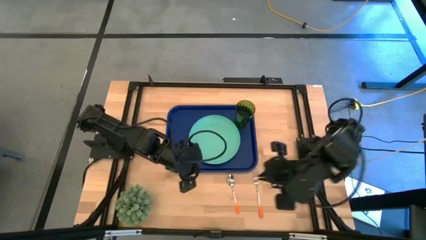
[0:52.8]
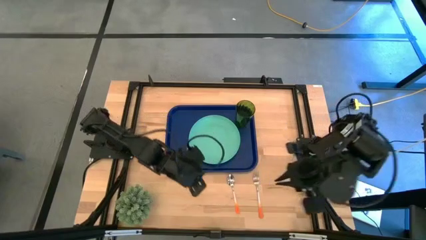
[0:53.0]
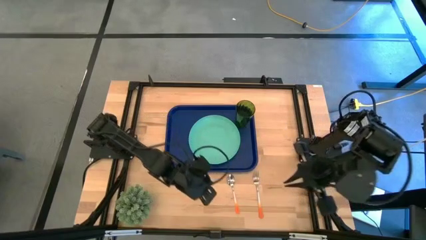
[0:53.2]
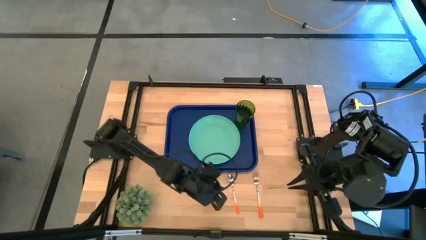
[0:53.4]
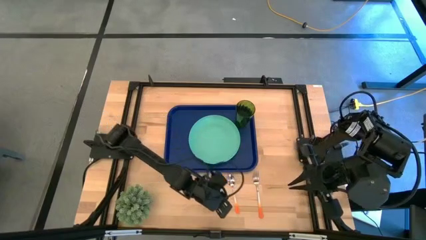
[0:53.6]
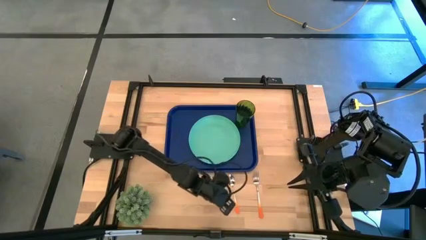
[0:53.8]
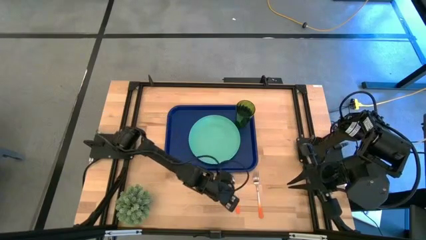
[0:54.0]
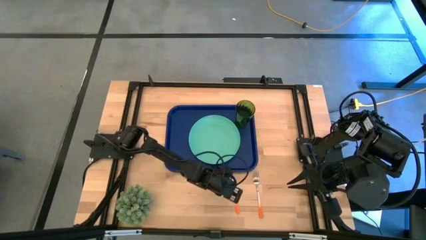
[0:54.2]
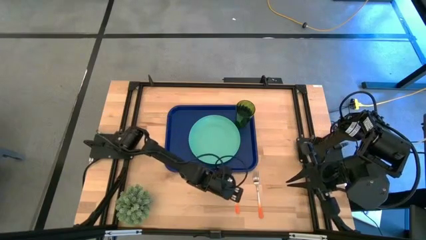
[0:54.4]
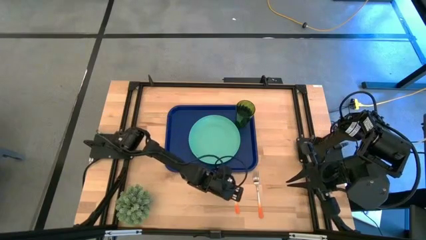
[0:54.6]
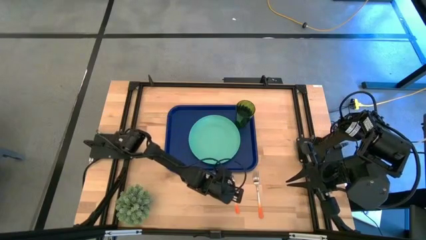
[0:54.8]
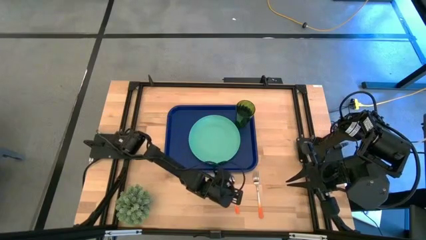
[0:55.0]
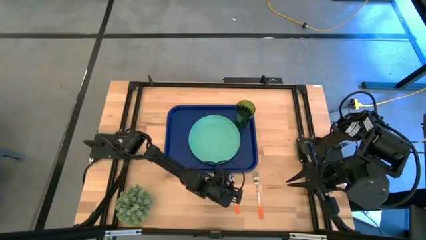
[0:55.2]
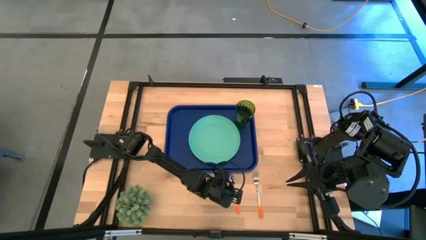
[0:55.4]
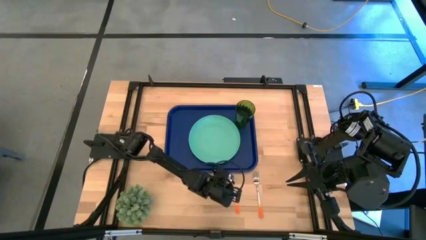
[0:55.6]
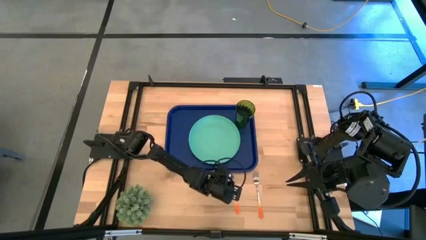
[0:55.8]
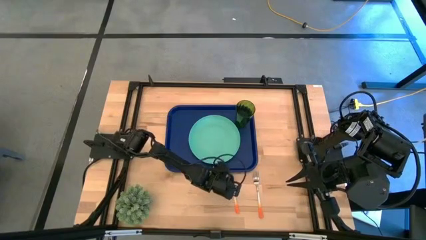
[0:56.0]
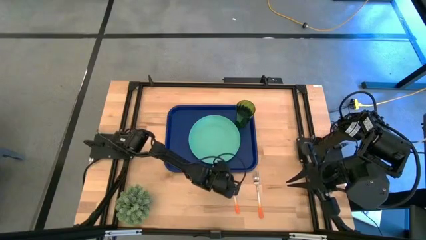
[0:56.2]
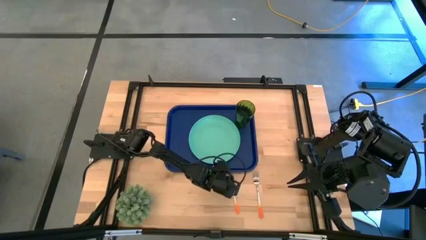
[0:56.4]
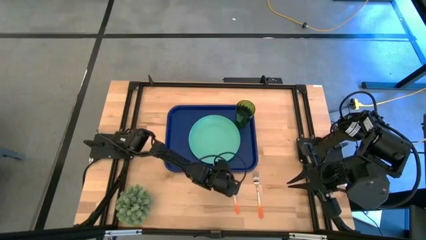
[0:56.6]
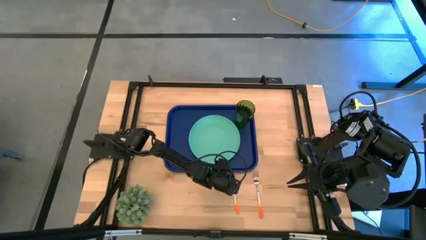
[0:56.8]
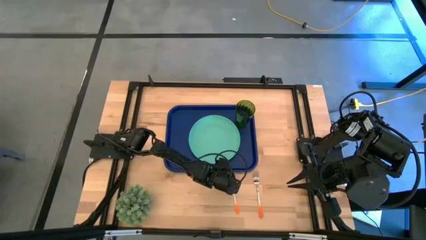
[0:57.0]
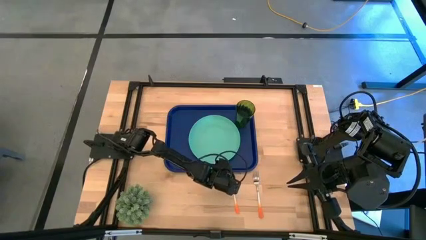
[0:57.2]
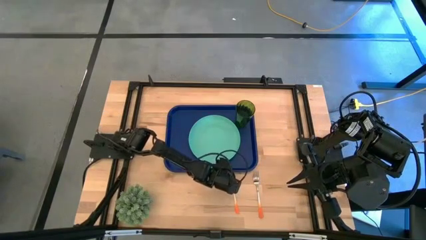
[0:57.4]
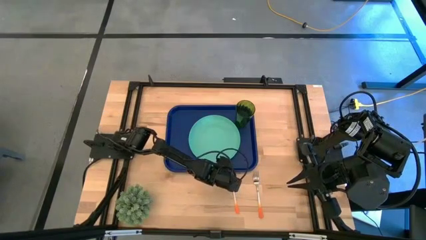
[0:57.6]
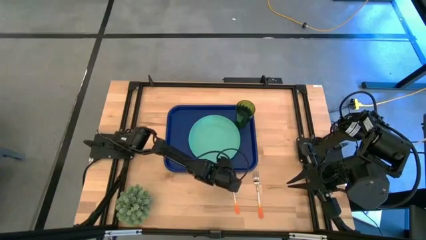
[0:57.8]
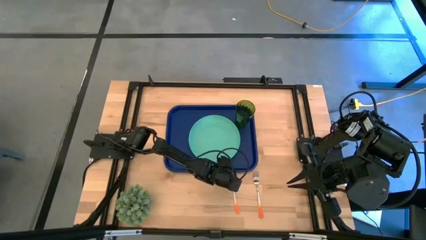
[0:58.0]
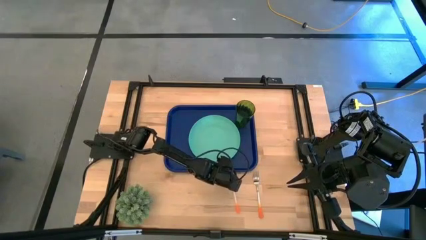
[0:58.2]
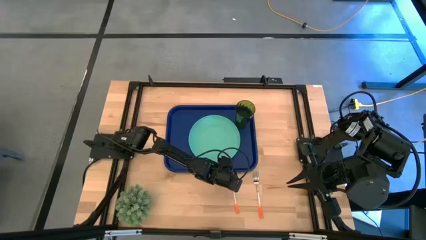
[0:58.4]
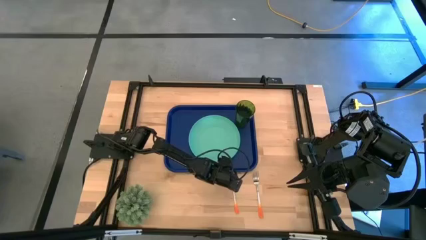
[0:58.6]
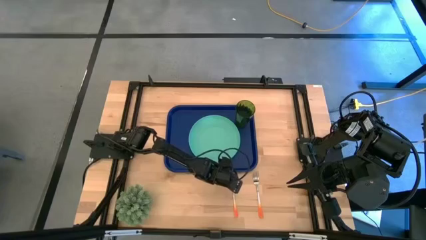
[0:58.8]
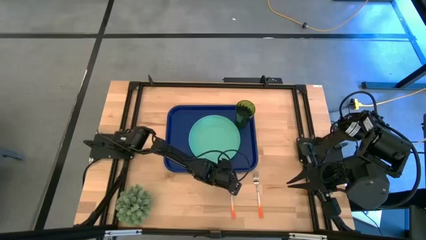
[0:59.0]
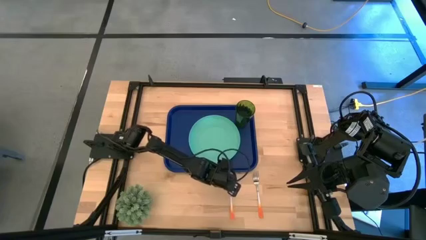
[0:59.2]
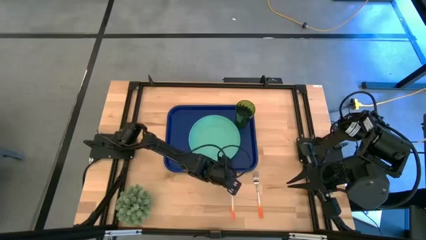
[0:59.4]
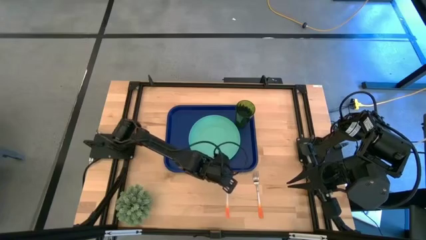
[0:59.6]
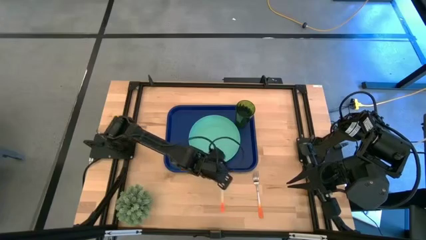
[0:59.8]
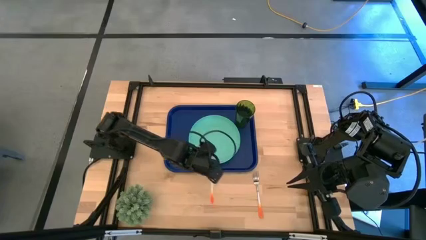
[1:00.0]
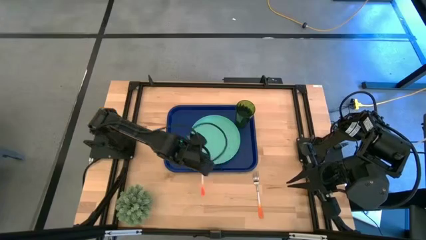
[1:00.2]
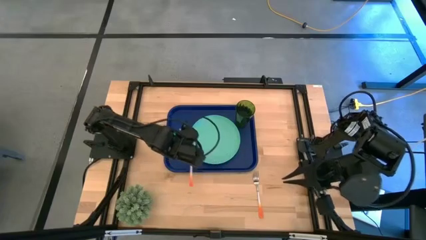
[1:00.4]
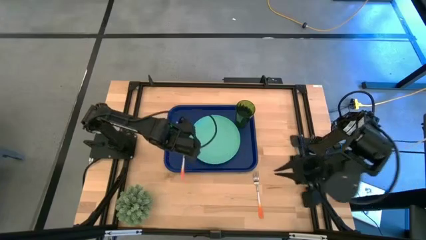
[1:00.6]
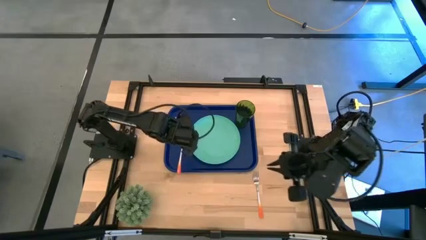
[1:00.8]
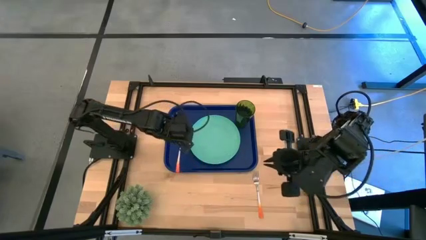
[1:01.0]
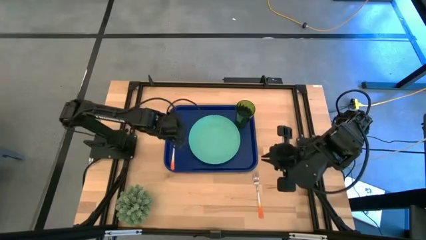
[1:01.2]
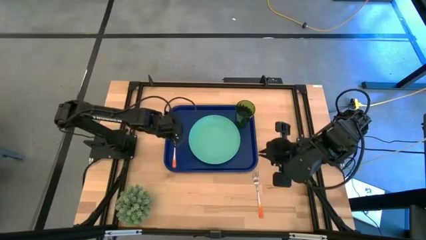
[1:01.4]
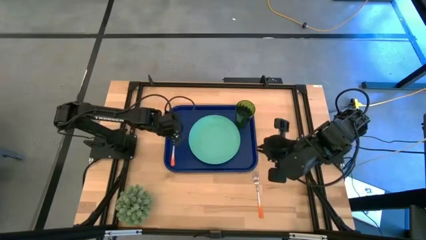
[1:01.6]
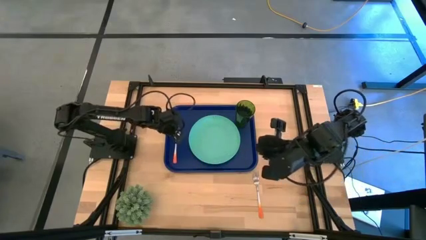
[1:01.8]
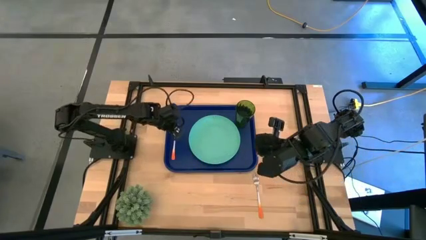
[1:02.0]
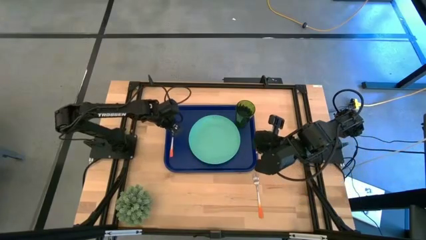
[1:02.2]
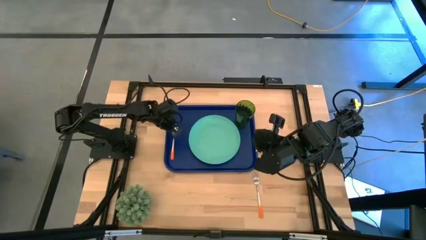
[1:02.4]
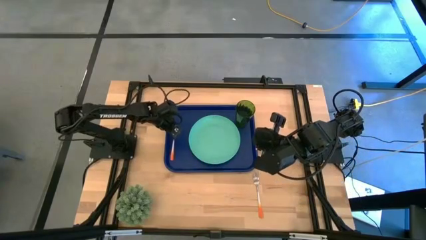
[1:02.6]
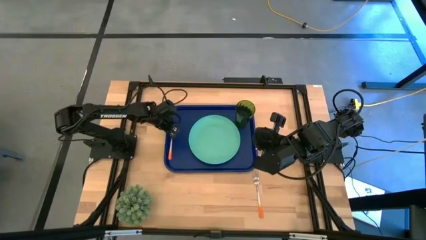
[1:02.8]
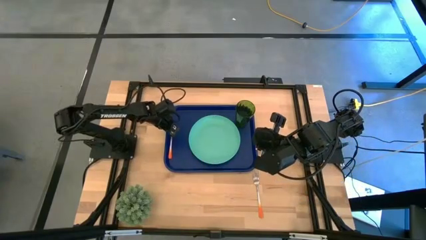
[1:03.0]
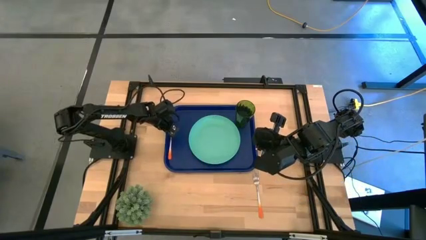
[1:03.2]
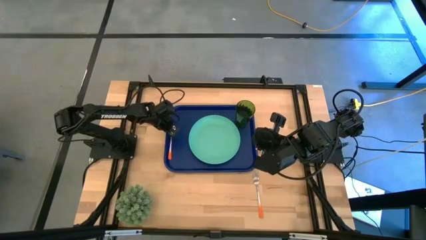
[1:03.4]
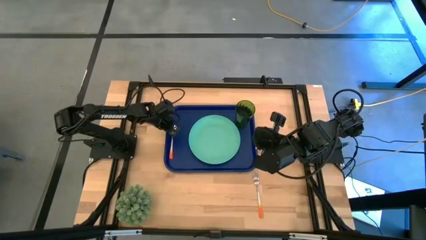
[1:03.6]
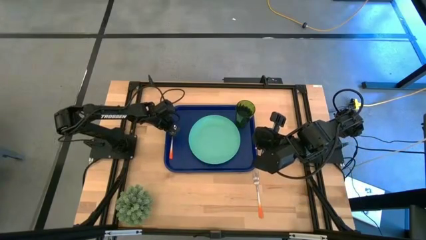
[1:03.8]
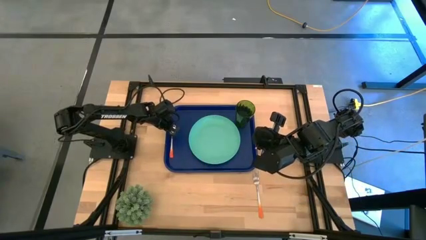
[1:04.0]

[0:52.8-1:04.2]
Task: Pick and place plate/cup/fork/spoon on tray
Put the orange spoon to the blue serving tray to the left side of the green plate

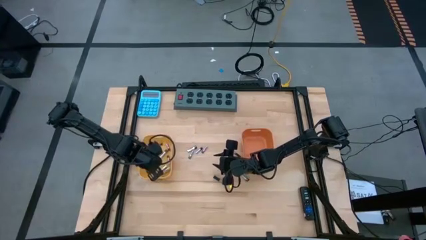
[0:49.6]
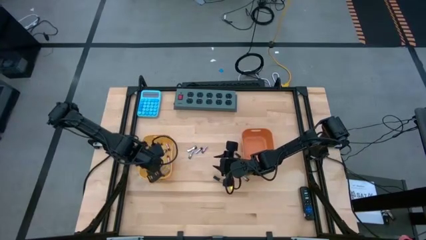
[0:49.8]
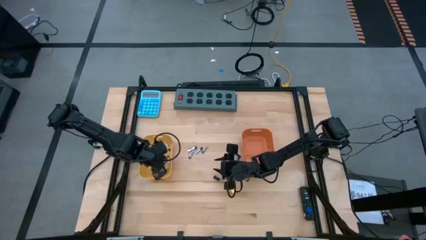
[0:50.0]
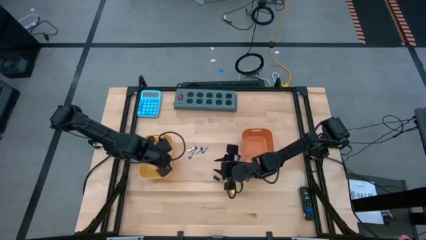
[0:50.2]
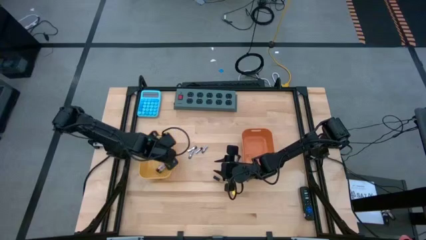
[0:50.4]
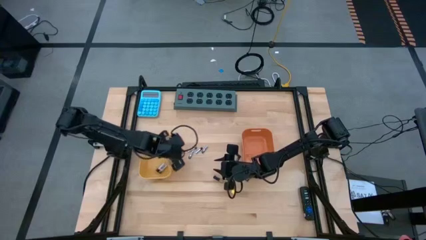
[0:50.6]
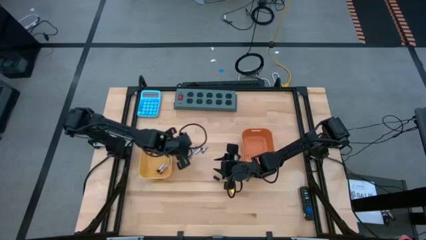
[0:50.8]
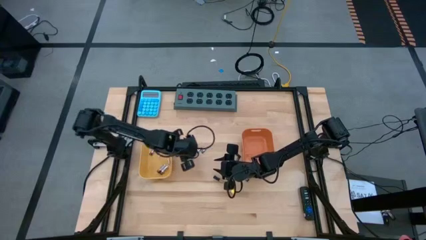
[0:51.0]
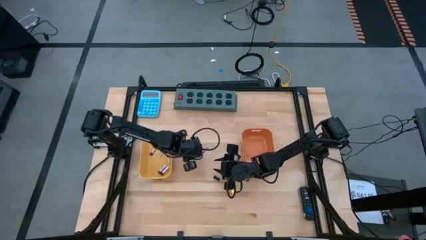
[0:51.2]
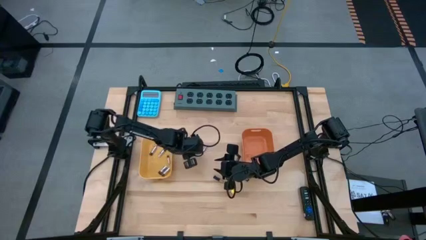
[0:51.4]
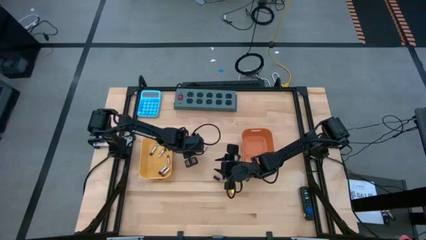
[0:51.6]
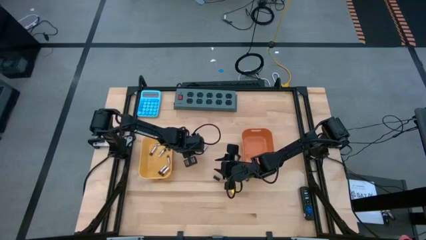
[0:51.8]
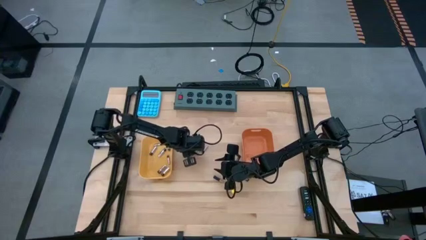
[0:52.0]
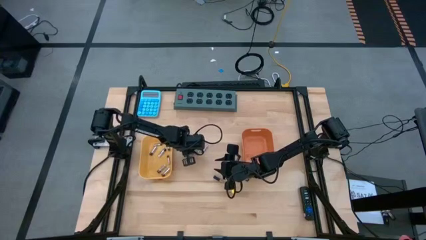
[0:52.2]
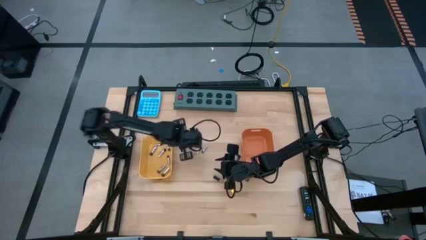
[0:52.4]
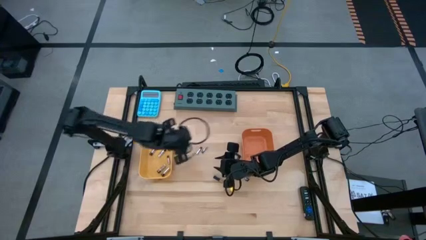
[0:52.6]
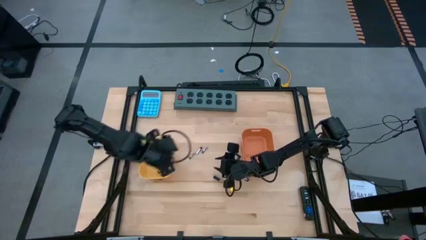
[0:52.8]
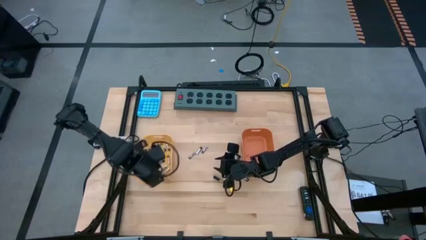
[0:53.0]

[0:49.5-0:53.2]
Task: Sort batteries
Put the silver battery into the yellow bin
